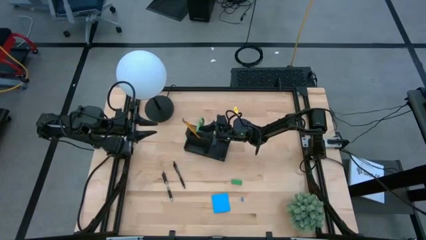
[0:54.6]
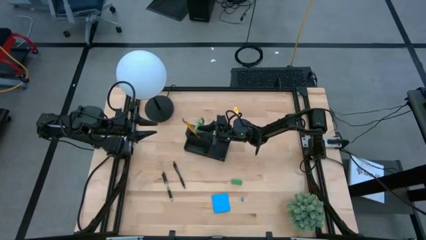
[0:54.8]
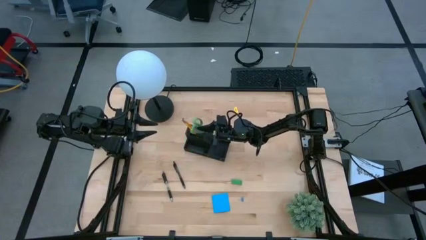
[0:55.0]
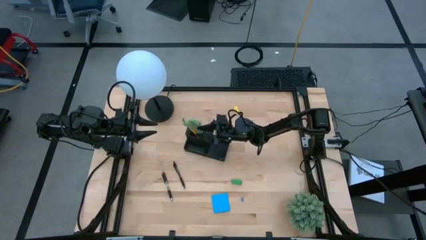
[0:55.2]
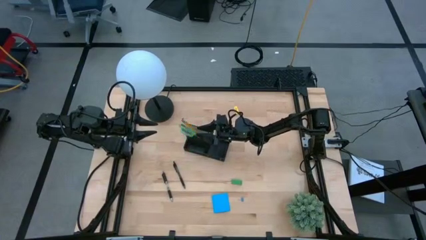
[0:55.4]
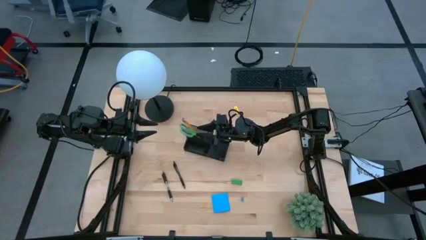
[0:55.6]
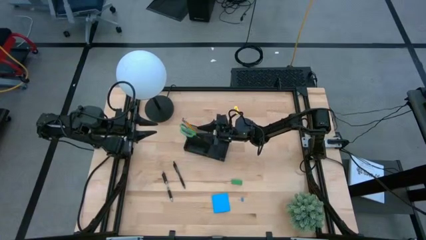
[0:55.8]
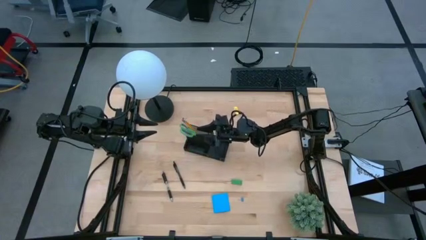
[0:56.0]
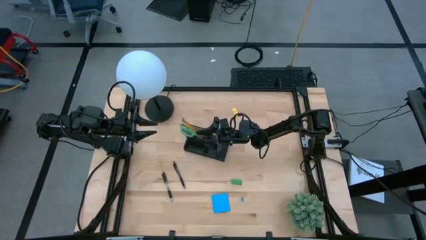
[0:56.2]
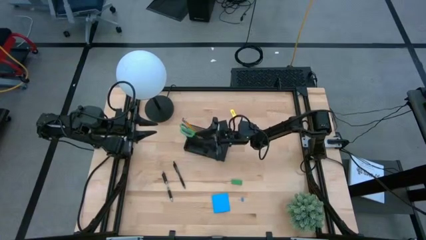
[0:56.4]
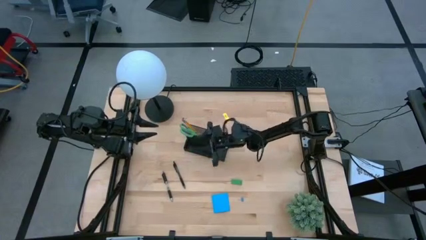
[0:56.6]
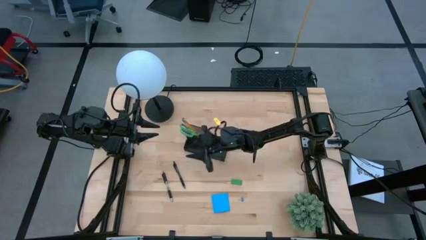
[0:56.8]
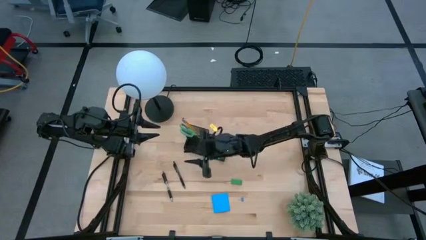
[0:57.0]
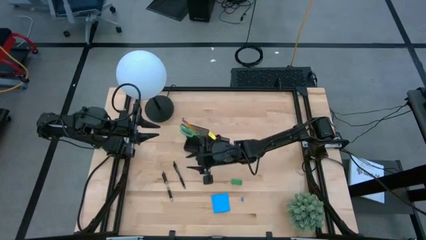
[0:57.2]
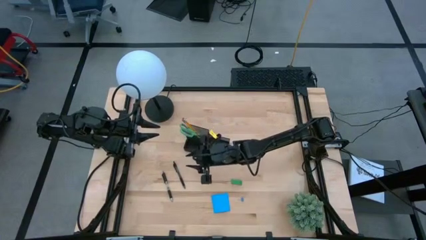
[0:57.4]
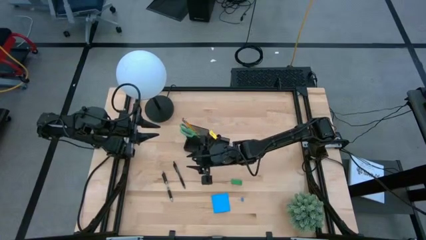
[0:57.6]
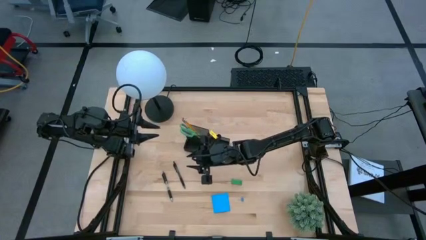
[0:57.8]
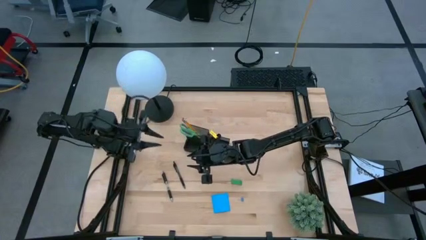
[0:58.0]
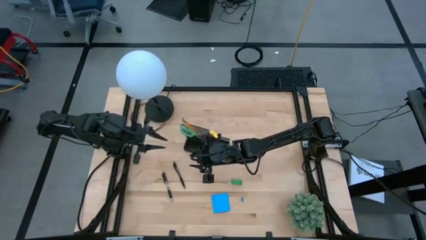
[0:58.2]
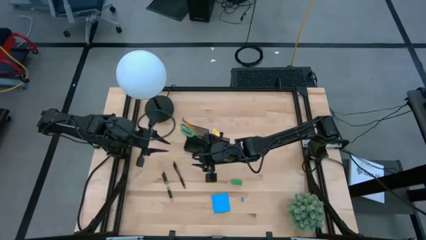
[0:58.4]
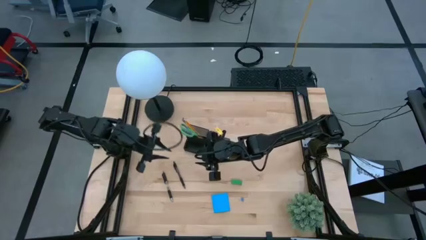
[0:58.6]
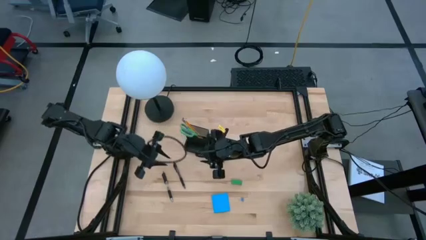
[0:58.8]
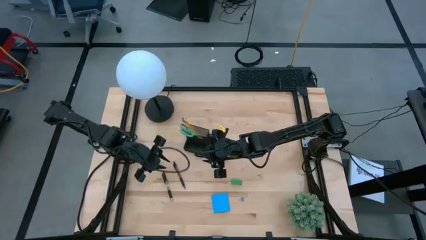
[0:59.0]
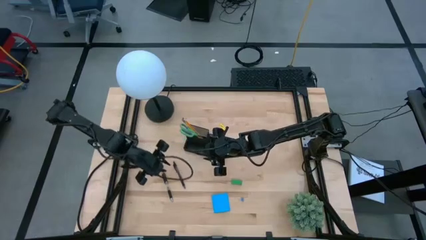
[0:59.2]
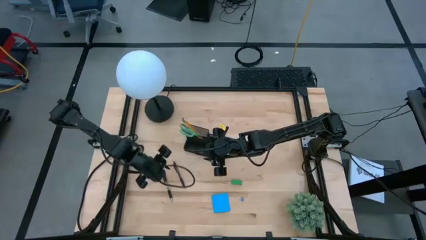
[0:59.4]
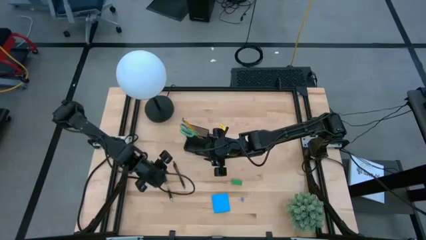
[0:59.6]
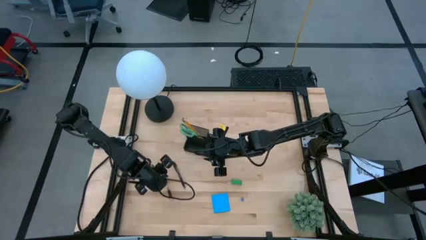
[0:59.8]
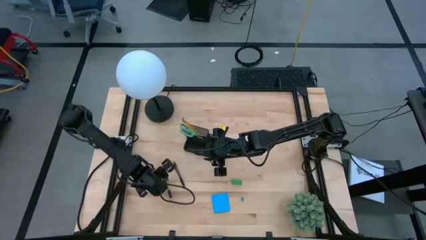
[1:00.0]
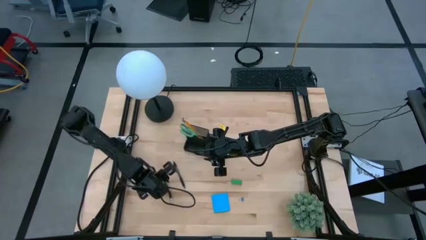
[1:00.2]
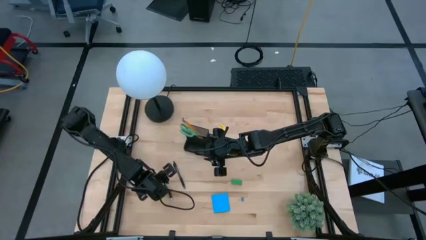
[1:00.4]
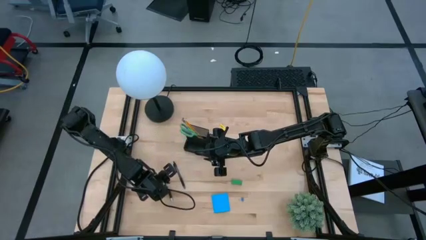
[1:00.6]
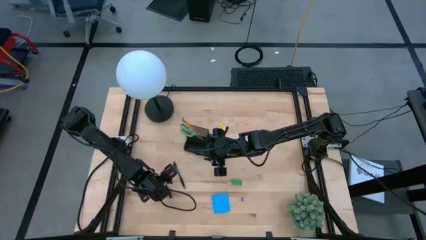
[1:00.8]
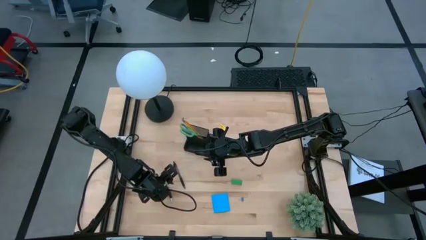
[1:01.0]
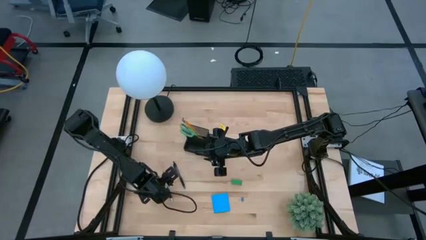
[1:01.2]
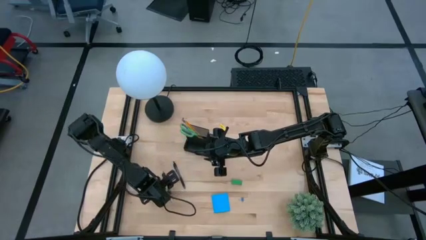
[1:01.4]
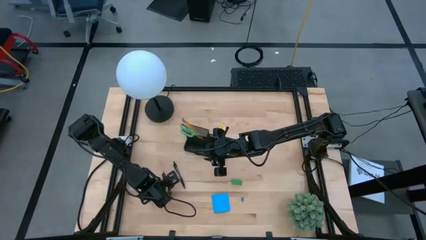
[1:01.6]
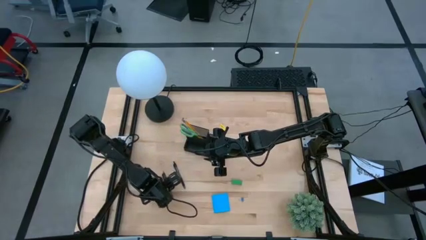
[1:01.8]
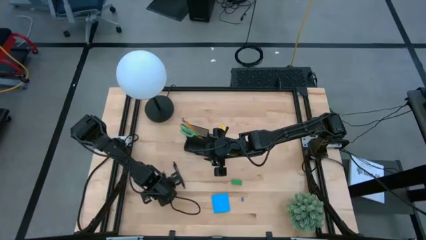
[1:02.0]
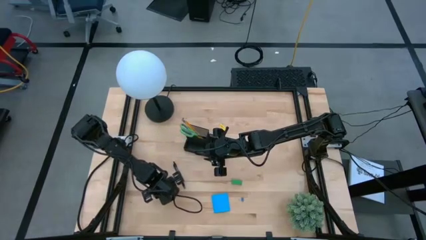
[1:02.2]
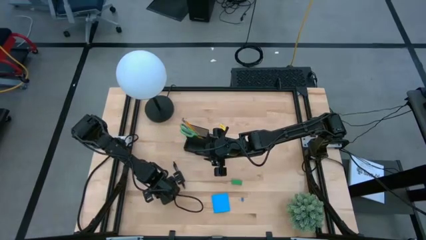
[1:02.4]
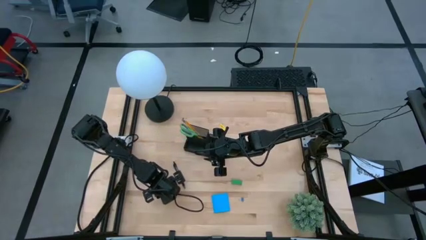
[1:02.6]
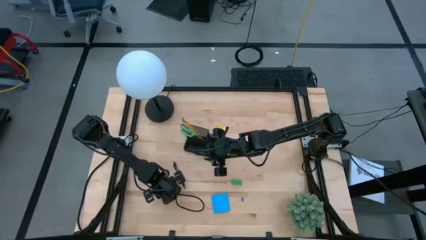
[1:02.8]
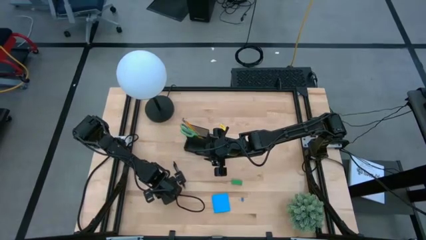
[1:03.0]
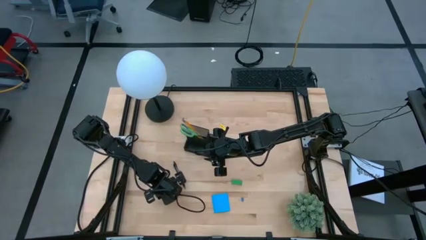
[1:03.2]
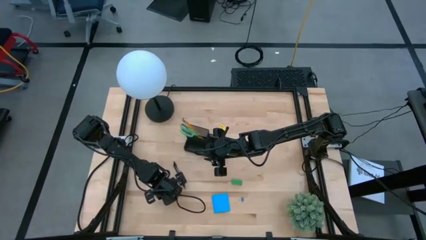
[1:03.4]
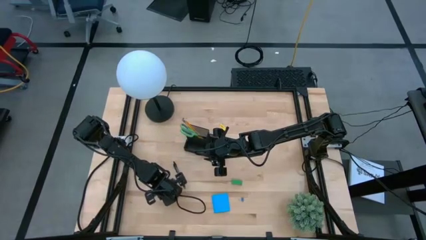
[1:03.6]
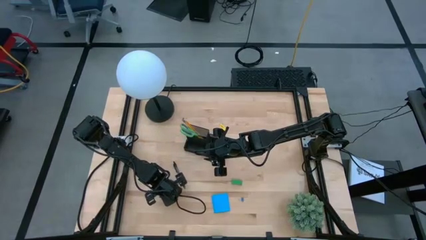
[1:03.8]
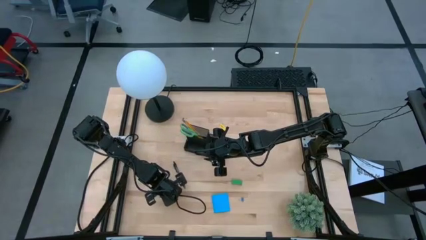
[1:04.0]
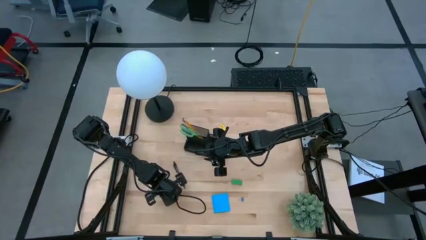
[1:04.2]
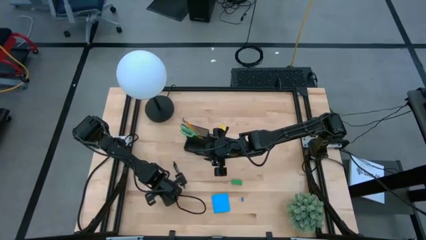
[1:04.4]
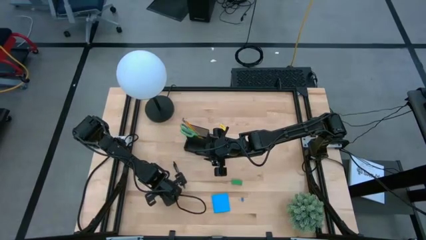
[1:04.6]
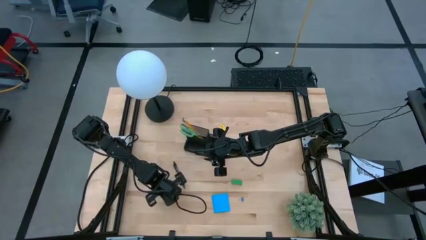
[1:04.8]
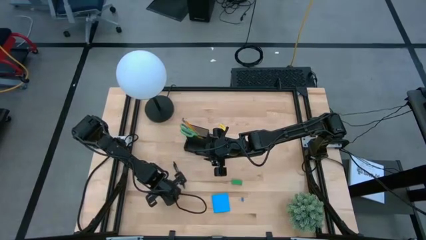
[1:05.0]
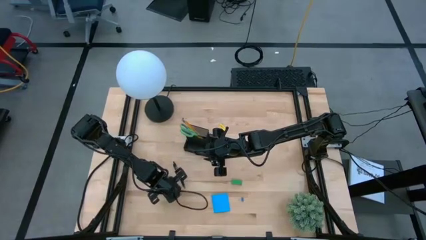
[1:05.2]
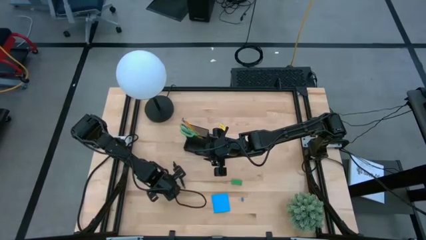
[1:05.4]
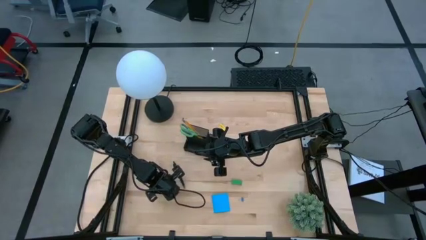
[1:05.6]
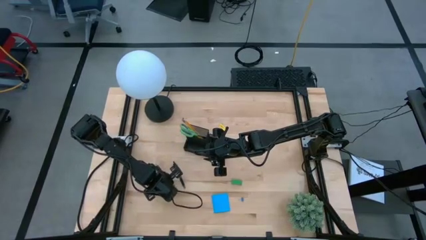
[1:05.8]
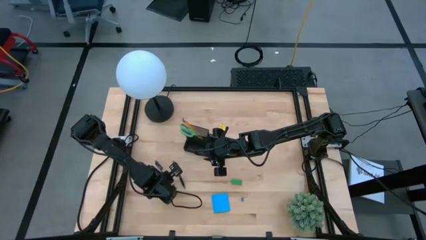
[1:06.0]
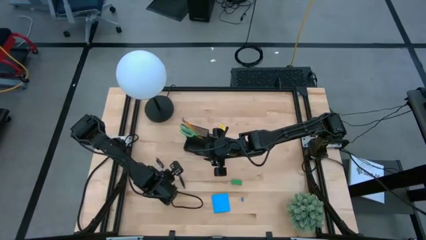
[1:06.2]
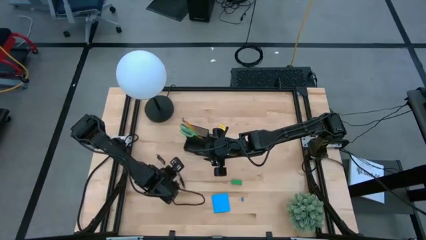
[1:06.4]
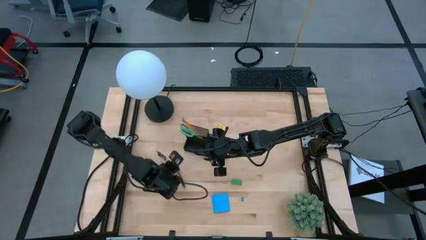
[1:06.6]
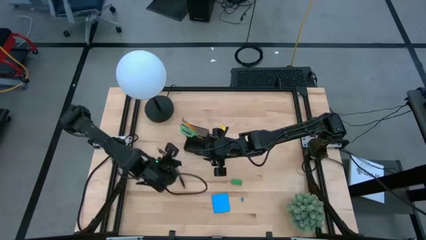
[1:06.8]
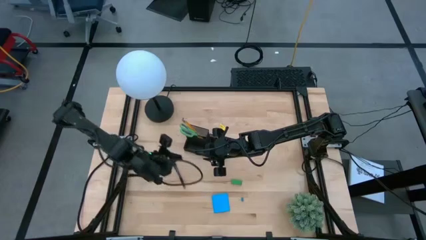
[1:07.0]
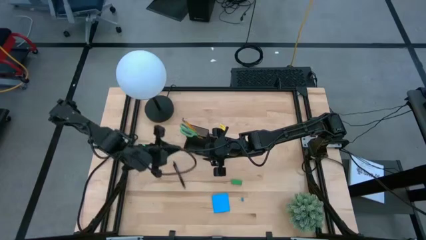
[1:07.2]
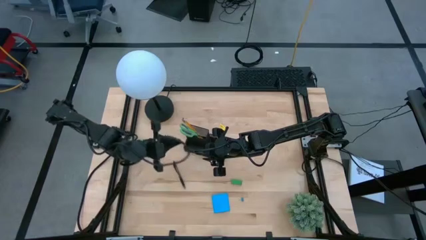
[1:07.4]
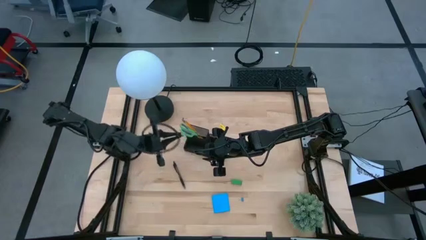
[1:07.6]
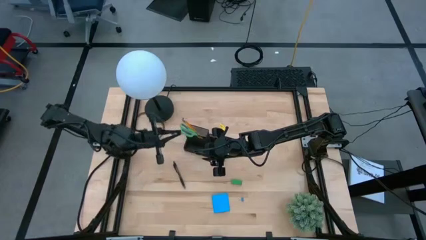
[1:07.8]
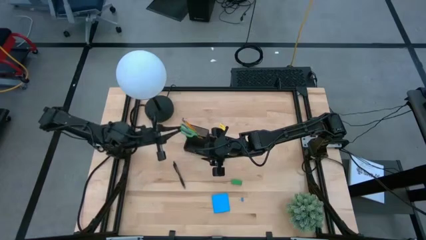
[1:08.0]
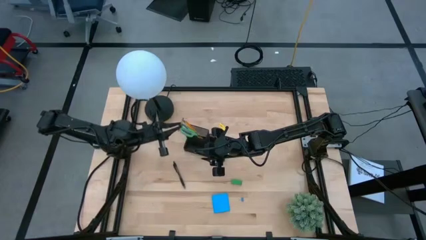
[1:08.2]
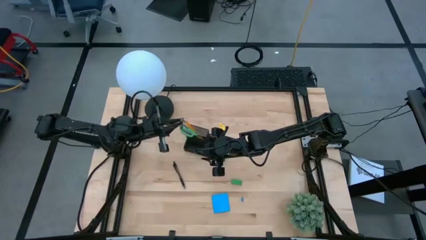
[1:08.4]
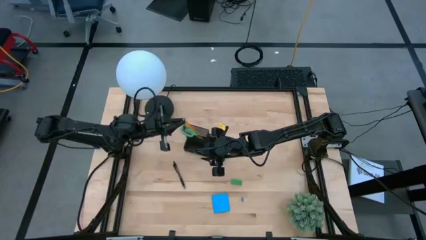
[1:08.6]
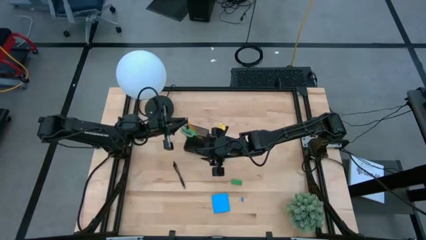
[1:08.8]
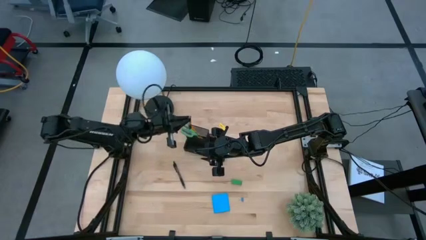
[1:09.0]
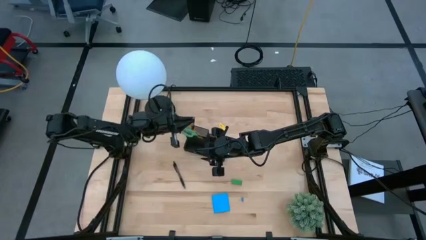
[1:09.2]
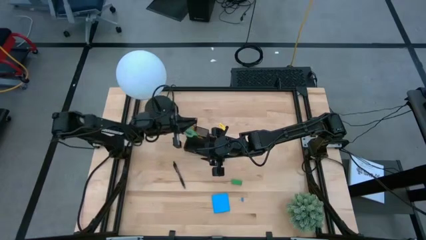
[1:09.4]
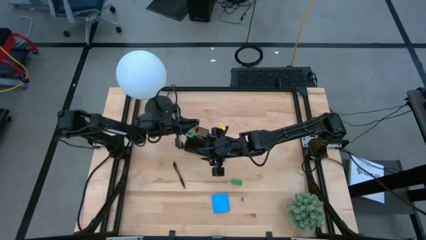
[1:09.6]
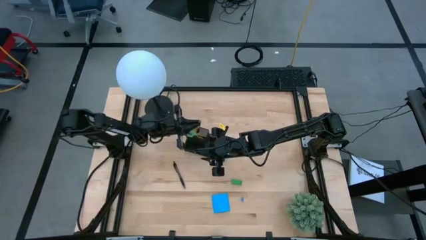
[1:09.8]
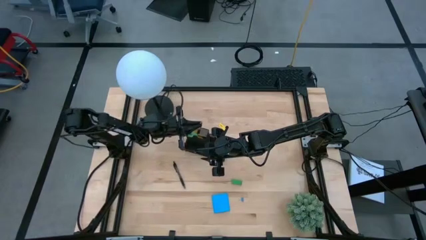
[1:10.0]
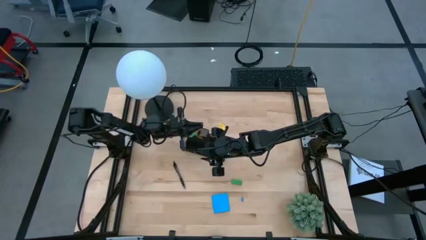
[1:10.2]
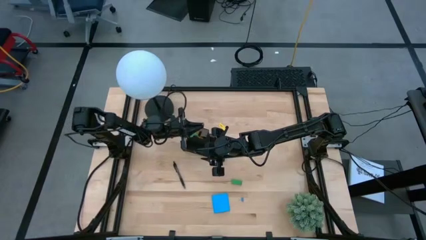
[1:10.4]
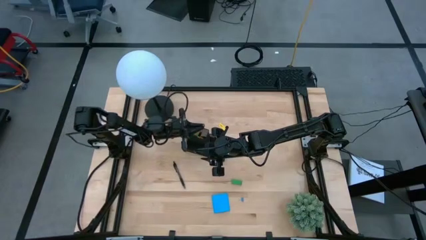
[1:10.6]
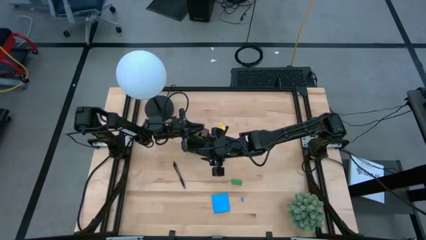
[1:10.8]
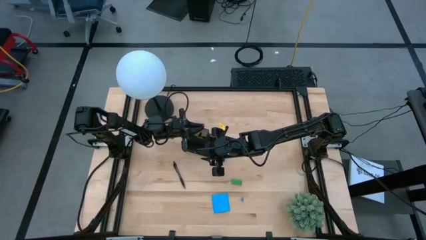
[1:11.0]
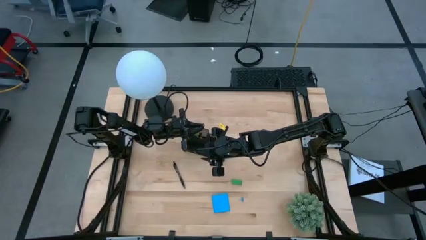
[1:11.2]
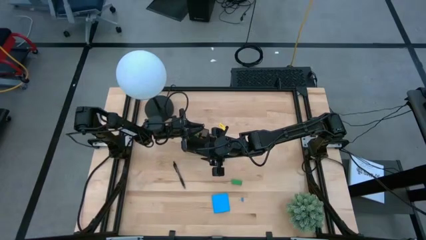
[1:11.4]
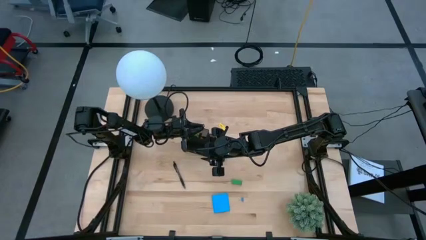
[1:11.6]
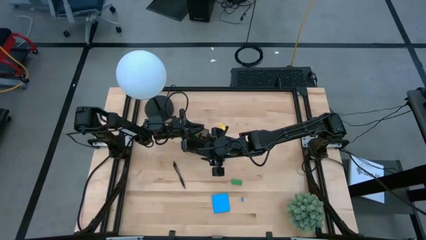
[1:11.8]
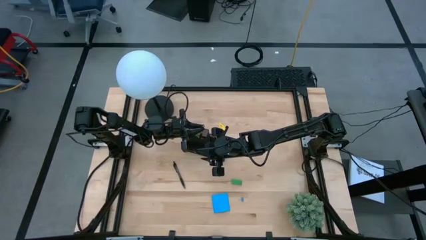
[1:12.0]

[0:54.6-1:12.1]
Task: Pick and place office supplies into organizer
Put the left black pen into the black desk organizer
